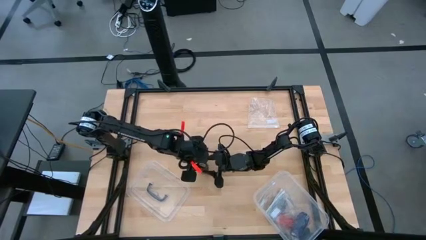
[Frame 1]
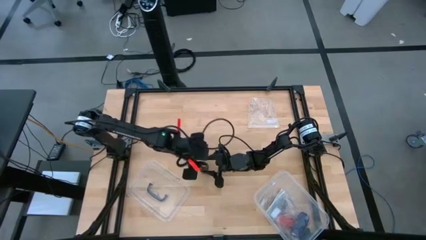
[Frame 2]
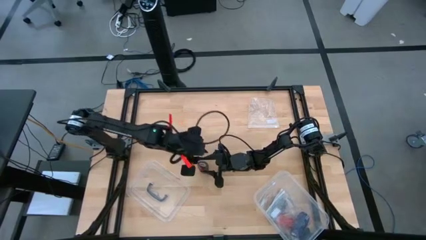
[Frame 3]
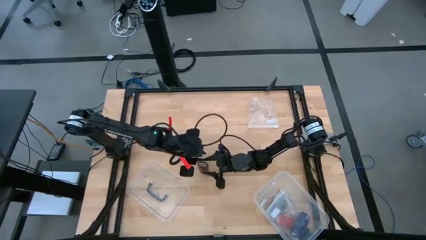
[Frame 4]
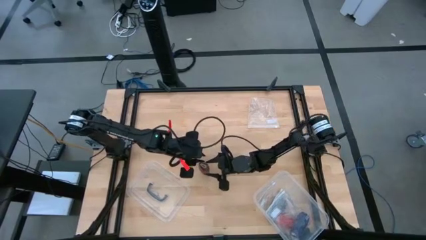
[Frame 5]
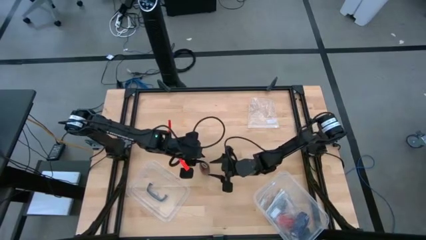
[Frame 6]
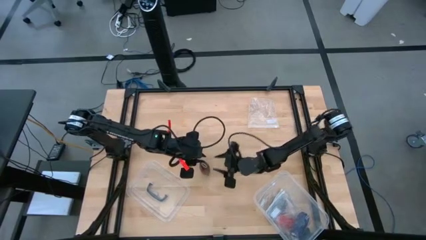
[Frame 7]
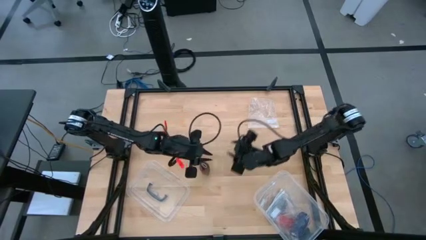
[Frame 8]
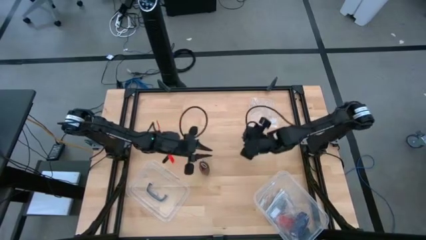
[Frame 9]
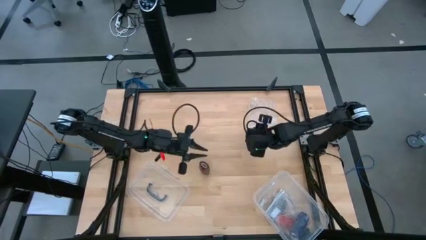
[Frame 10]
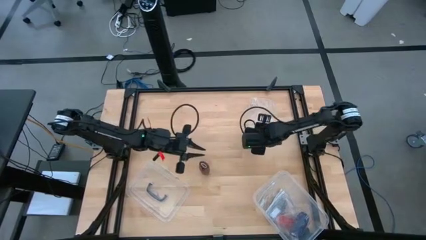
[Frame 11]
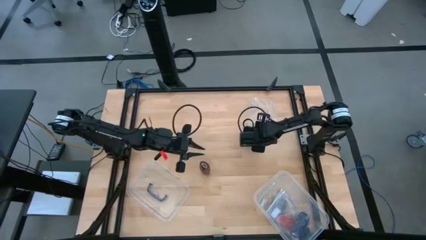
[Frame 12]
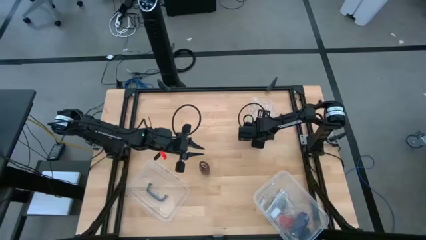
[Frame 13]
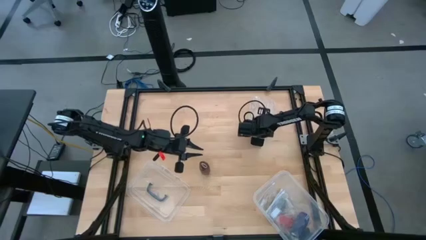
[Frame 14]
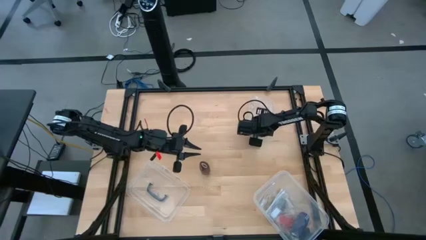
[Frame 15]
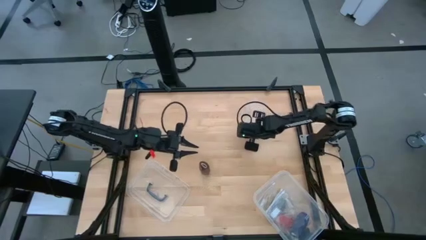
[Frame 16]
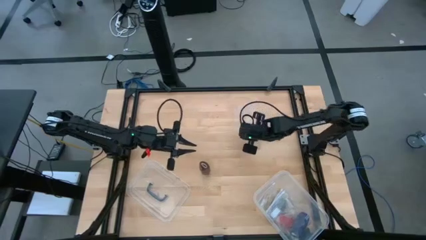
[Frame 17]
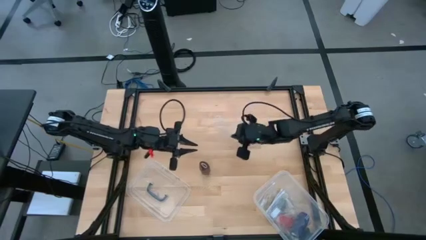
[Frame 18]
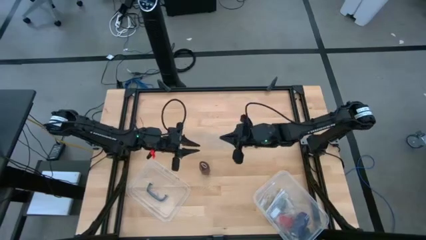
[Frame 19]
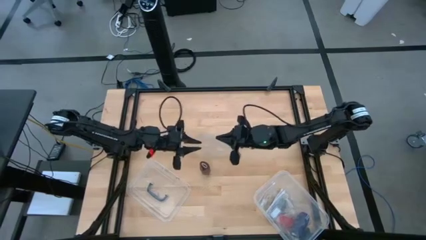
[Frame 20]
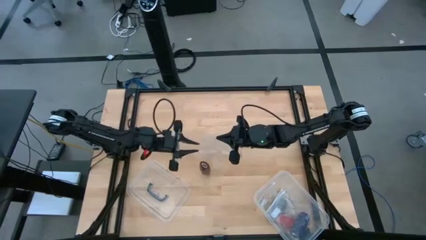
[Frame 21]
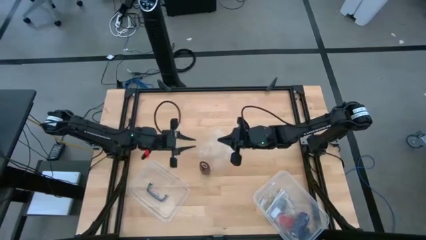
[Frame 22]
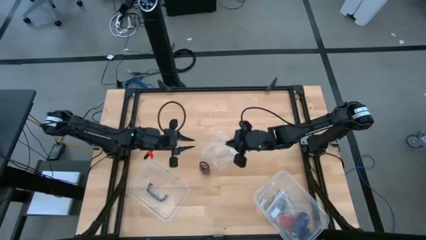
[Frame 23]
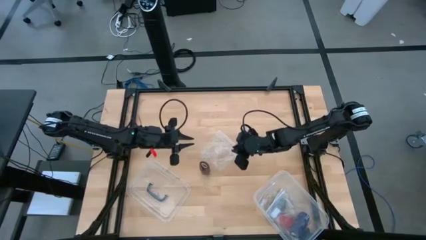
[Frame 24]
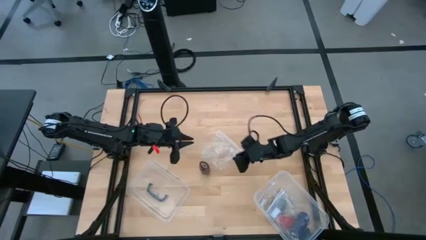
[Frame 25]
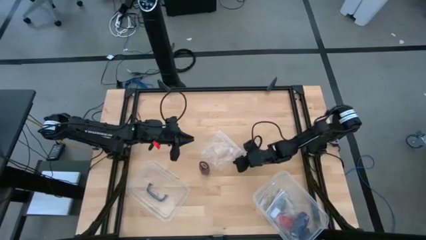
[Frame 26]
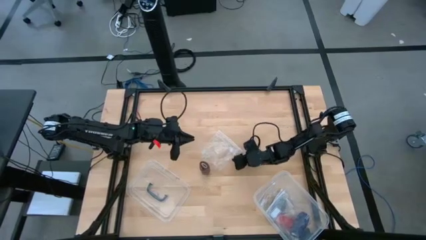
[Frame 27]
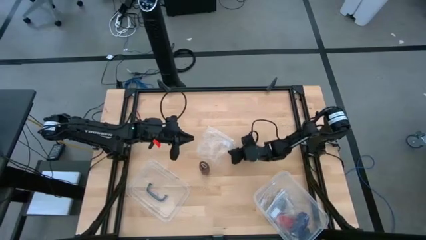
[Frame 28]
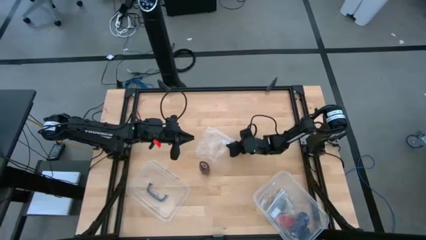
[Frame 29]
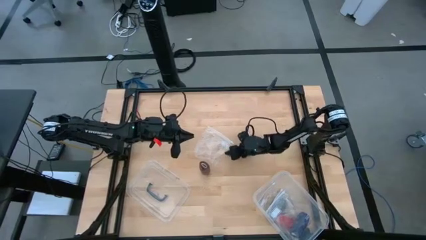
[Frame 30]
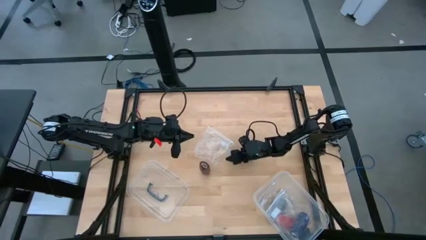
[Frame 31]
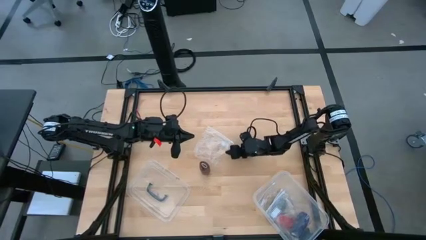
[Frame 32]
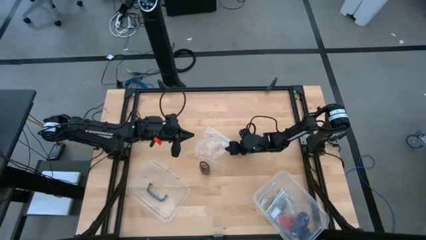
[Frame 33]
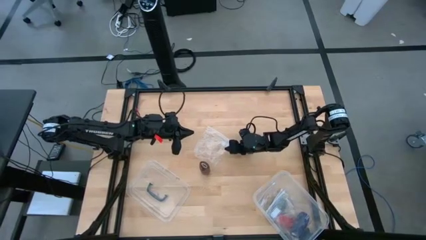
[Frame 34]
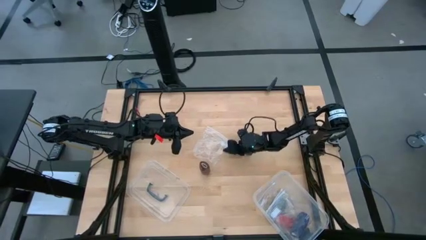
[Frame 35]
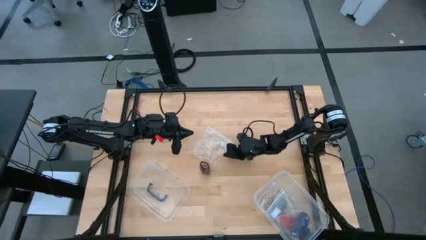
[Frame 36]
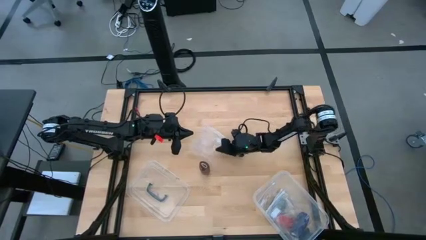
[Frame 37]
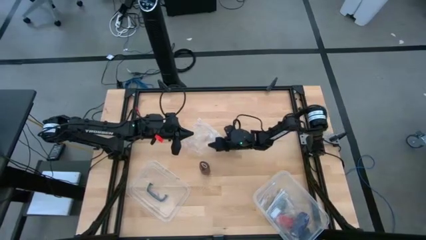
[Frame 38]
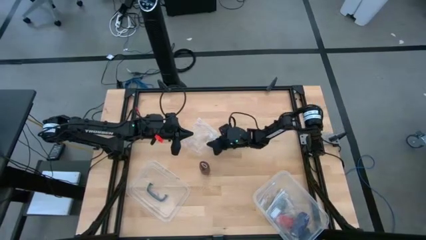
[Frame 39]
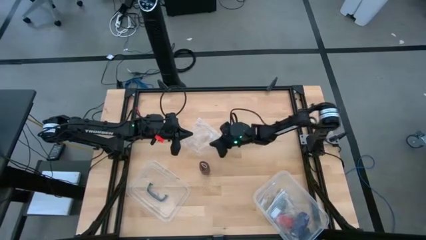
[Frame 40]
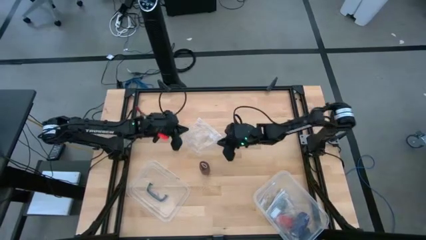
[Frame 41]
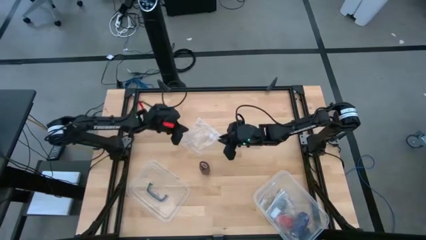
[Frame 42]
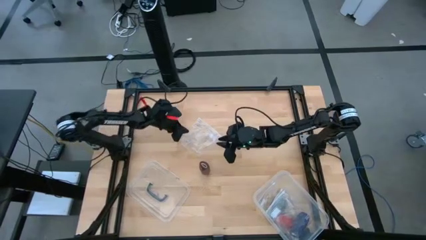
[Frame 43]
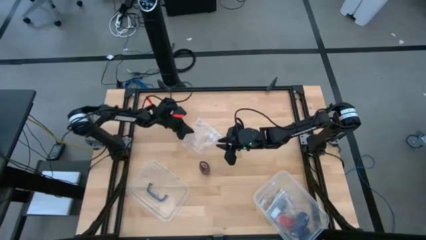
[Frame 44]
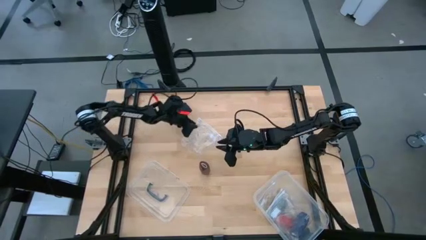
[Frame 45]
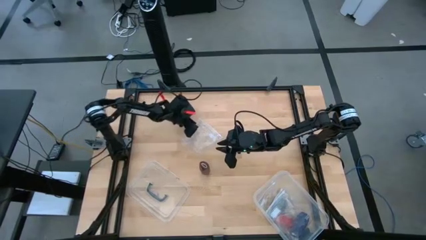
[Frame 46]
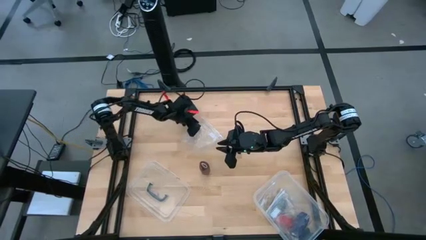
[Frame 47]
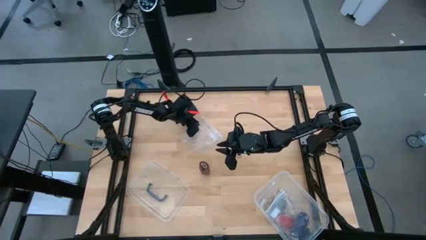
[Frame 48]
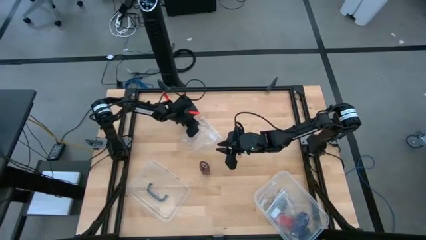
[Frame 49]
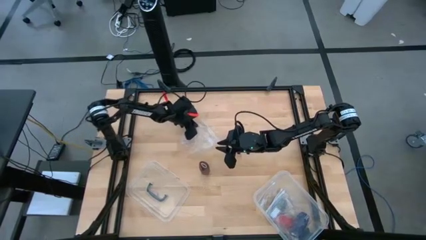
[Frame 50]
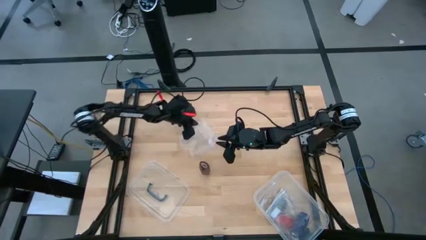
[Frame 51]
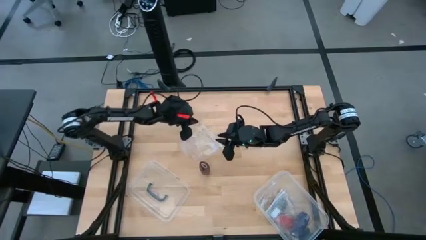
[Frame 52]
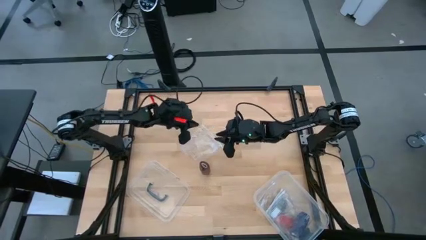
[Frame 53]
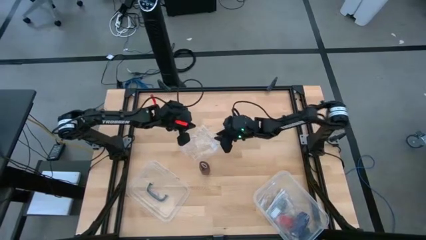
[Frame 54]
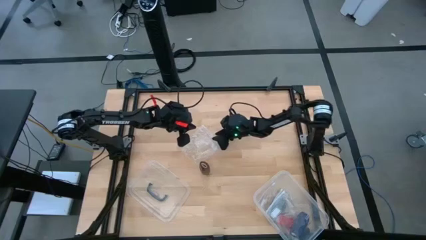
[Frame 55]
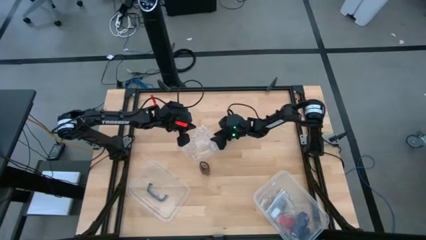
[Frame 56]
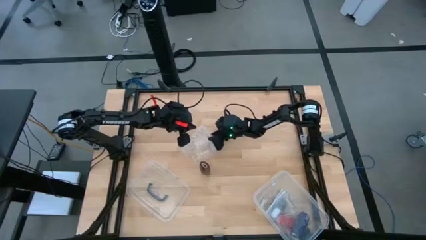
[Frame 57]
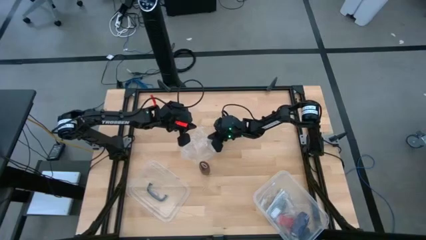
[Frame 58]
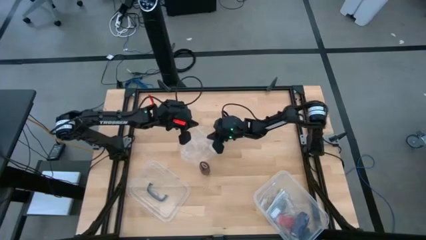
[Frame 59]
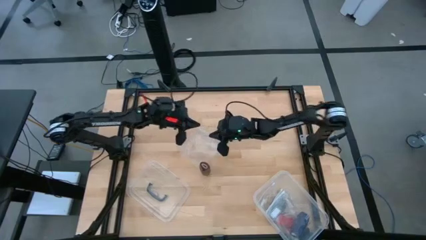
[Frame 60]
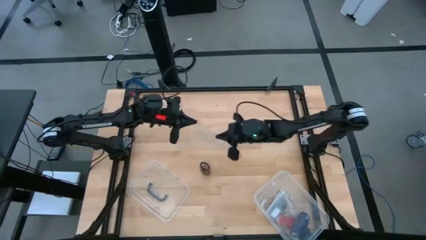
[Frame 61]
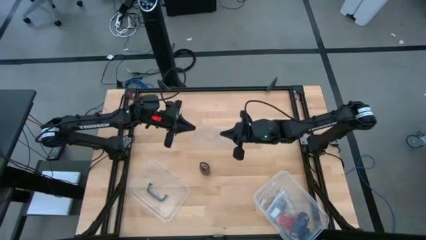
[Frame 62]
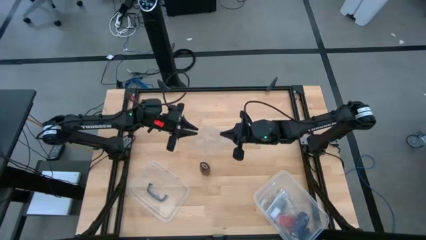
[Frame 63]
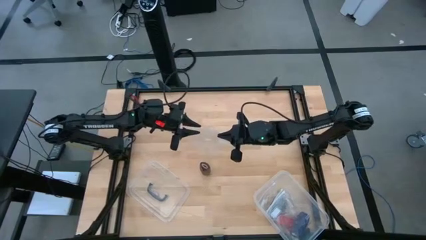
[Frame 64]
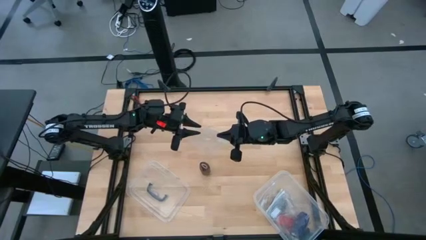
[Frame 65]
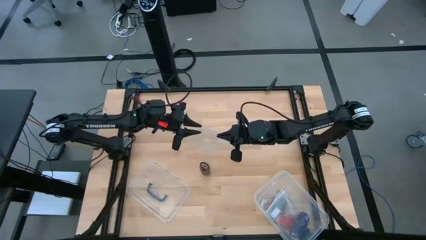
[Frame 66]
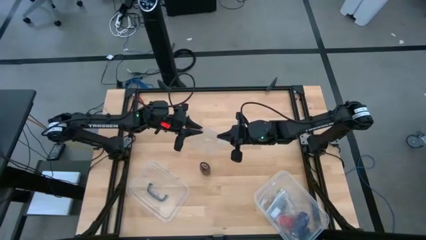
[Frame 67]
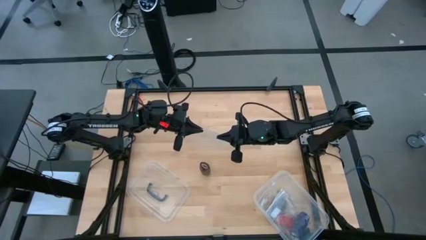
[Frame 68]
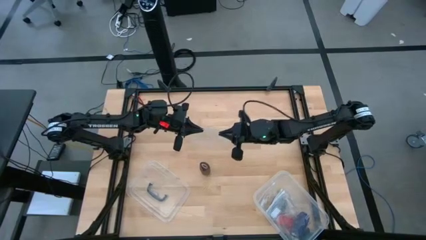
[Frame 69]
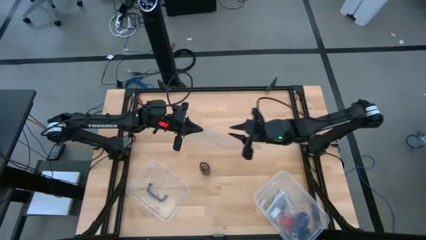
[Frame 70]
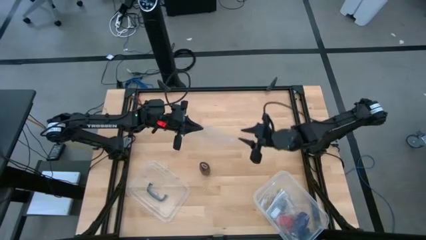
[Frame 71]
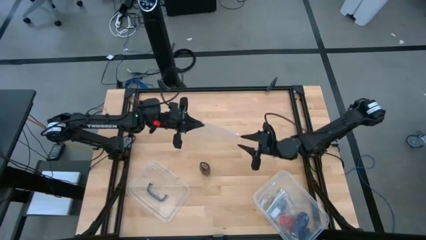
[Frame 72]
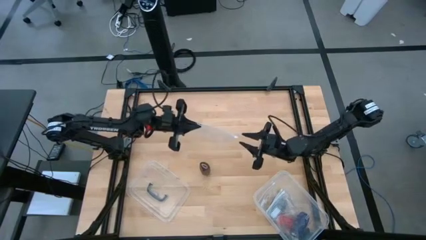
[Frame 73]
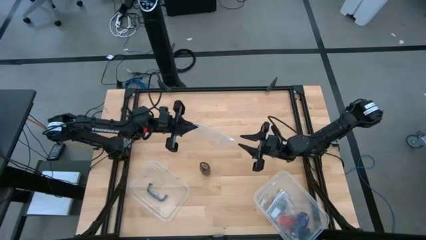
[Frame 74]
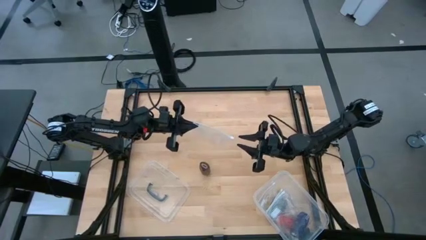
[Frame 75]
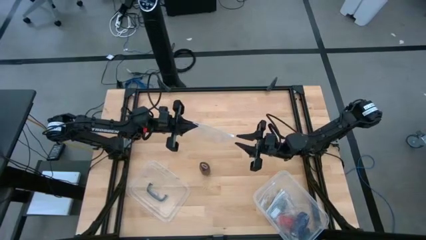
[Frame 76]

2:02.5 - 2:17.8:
Task: Roll bandage
Put the rolled brown bandage into the transparent zip bag

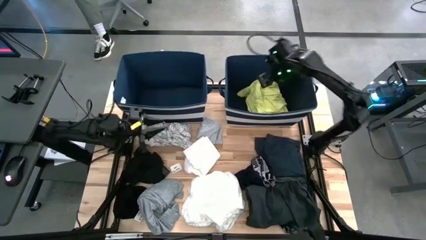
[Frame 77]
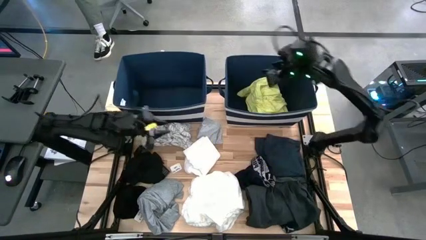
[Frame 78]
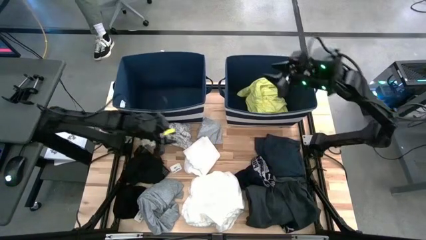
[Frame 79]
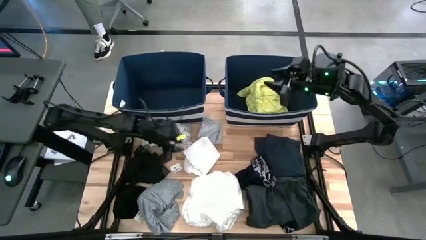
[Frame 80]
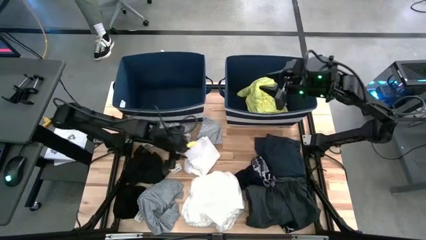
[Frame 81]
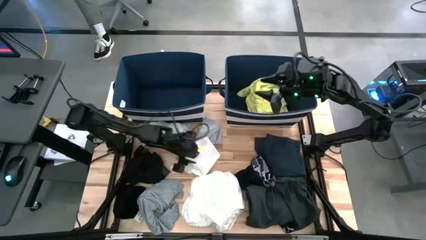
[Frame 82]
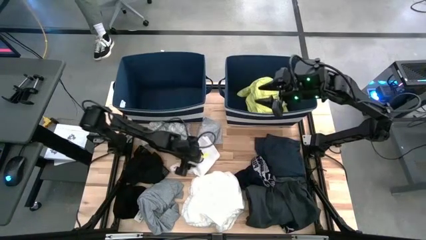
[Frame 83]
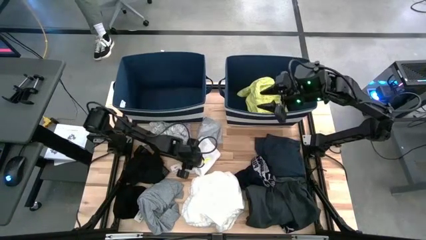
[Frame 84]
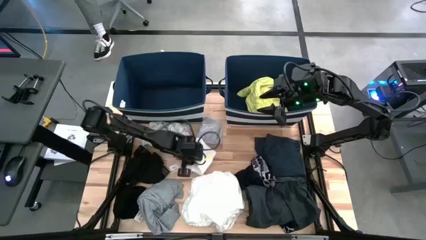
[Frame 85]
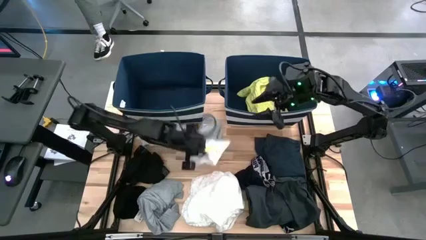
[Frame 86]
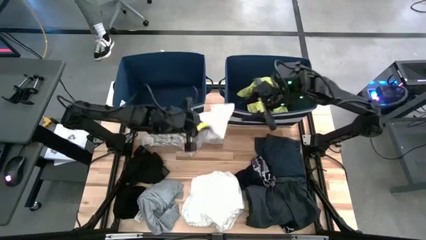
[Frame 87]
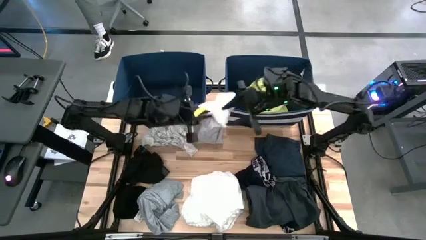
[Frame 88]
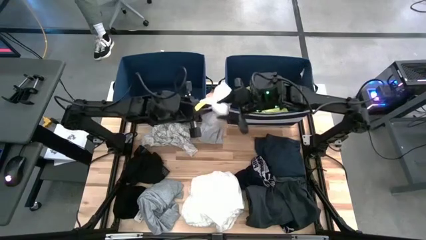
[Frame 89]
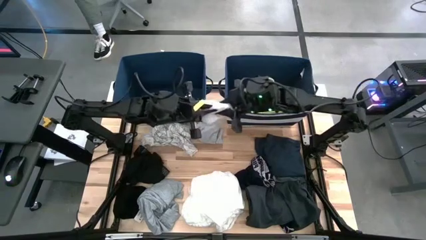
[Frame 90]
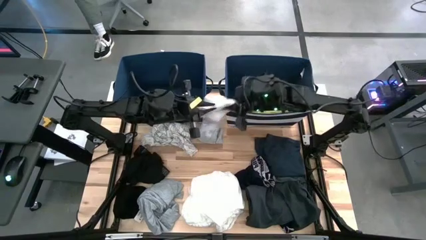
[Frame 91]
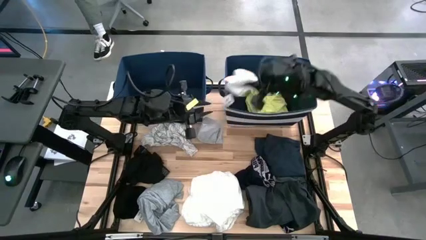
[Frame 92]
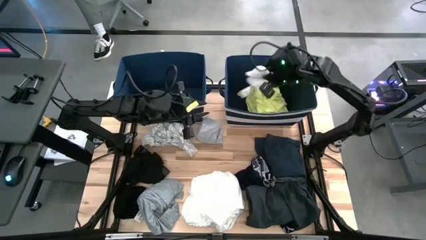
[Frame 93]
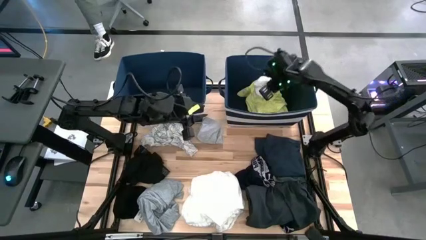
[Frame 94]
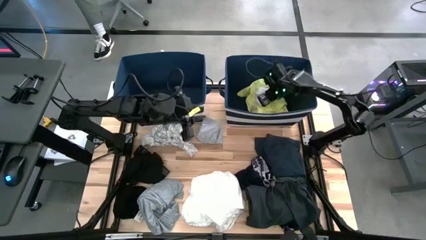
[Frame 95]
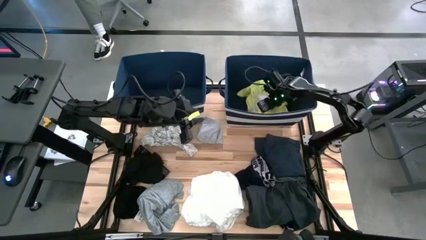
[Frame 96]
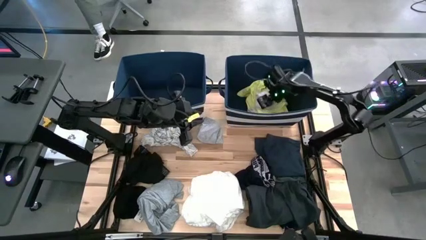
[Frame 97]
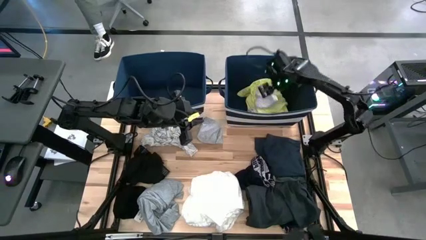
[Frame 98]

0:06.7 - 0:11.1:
Task: Sort clothes
Put the white underwear into the right blue laundry bin
